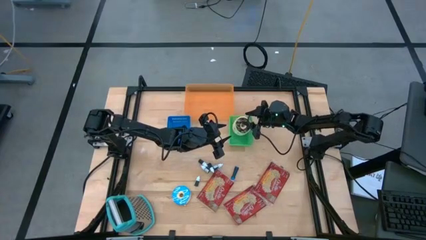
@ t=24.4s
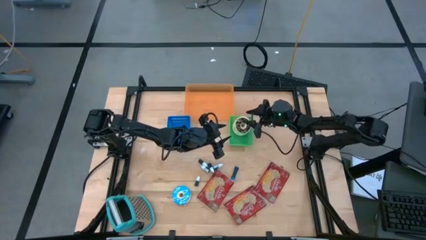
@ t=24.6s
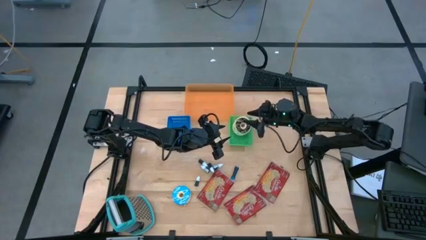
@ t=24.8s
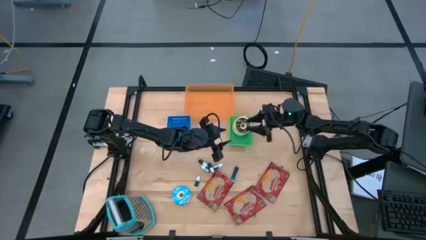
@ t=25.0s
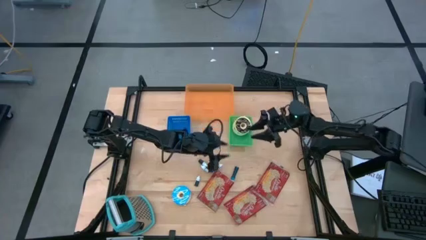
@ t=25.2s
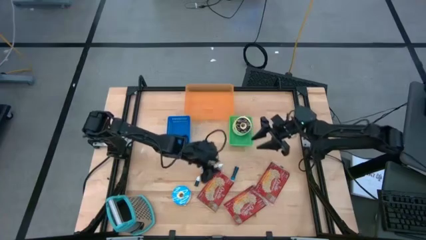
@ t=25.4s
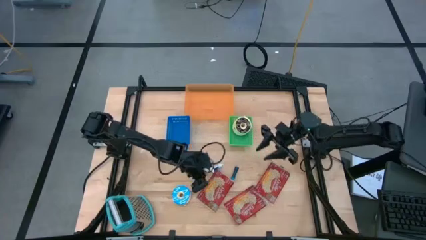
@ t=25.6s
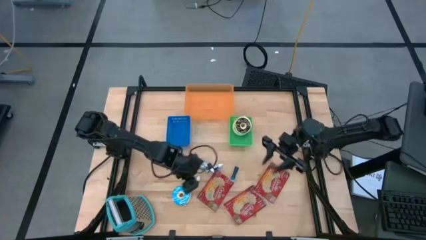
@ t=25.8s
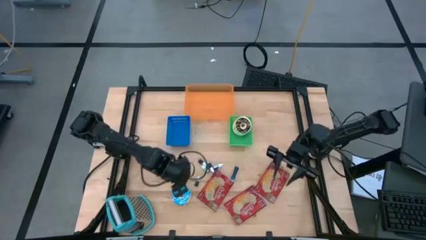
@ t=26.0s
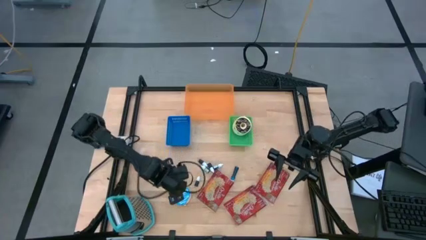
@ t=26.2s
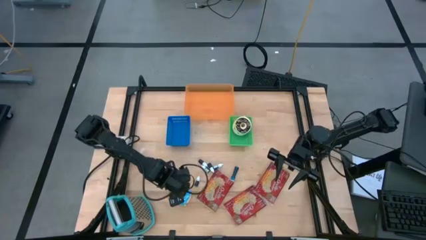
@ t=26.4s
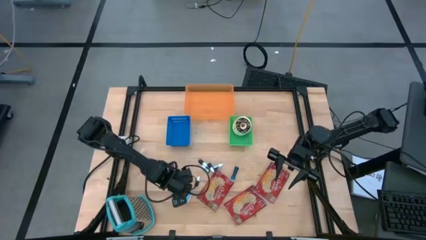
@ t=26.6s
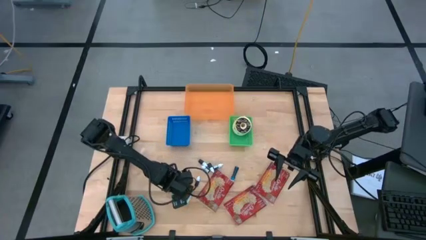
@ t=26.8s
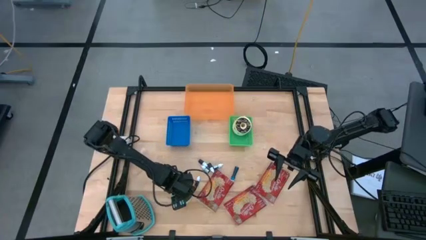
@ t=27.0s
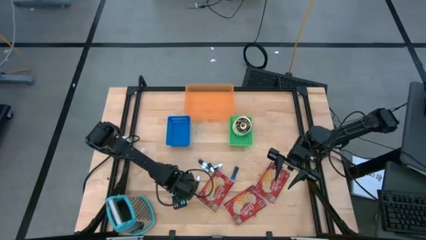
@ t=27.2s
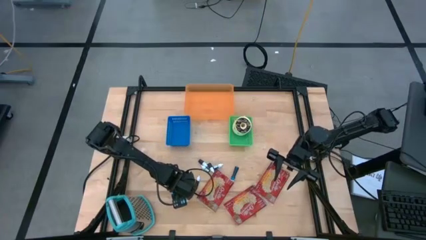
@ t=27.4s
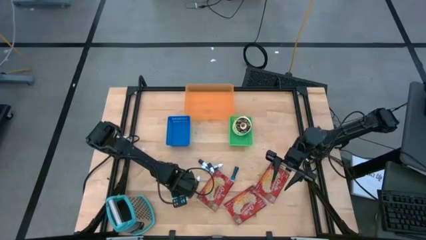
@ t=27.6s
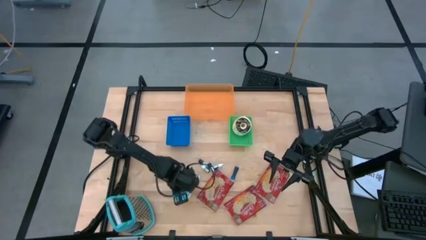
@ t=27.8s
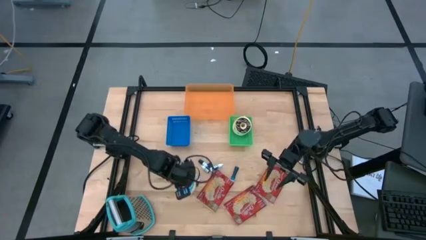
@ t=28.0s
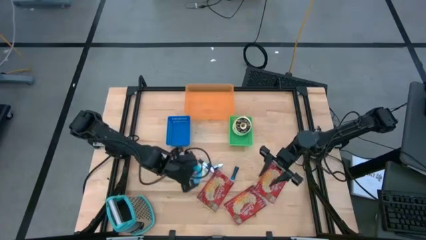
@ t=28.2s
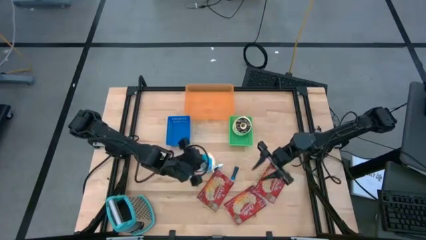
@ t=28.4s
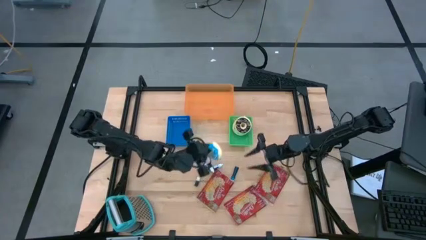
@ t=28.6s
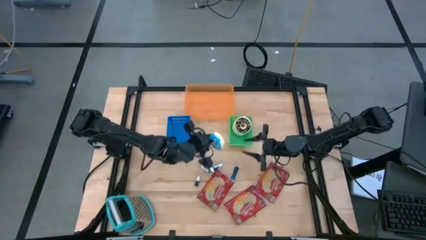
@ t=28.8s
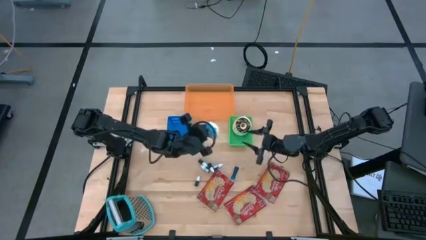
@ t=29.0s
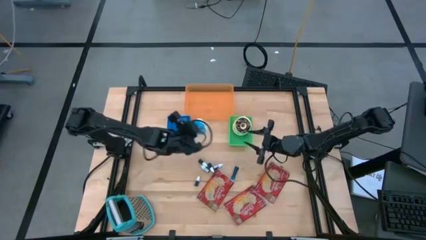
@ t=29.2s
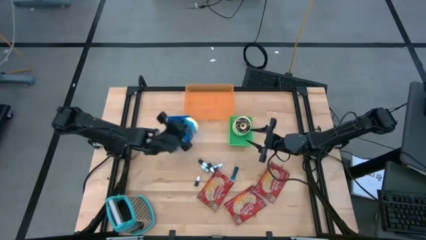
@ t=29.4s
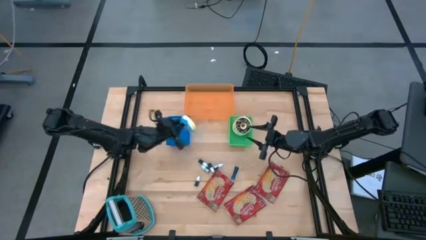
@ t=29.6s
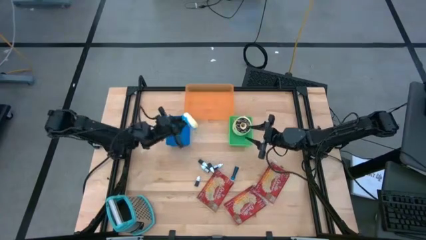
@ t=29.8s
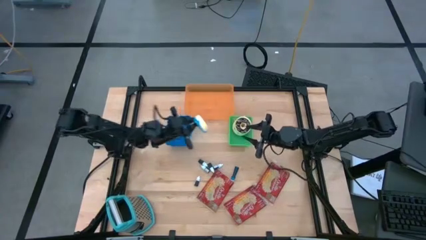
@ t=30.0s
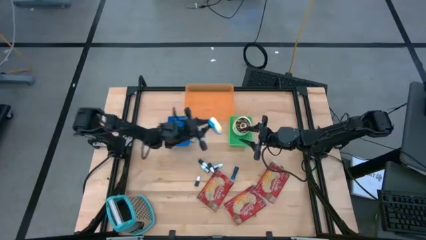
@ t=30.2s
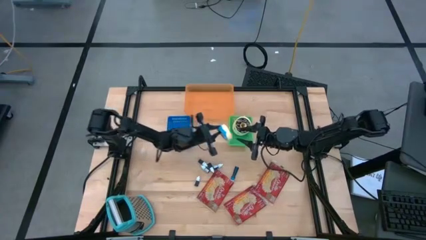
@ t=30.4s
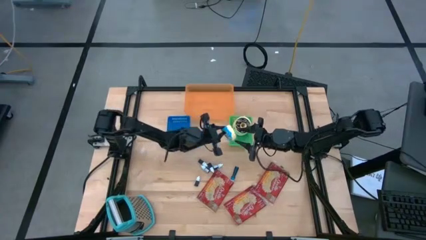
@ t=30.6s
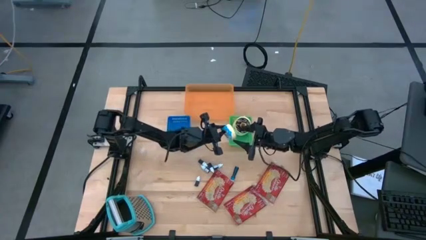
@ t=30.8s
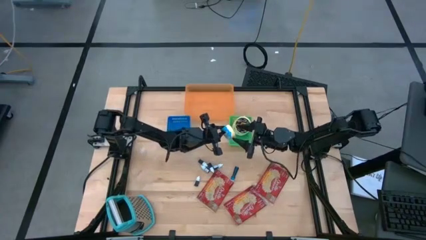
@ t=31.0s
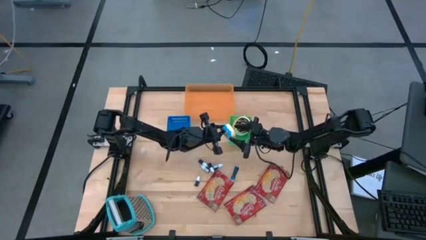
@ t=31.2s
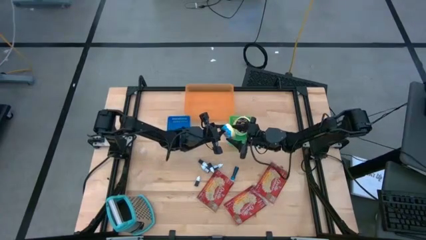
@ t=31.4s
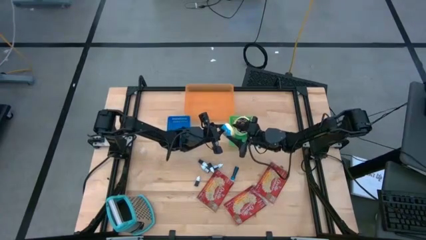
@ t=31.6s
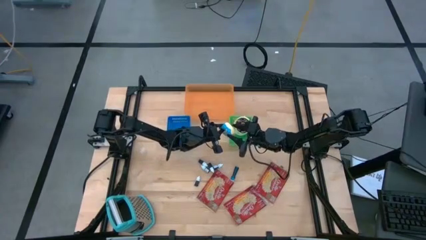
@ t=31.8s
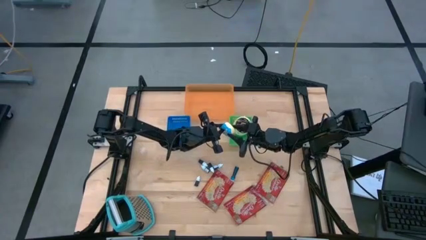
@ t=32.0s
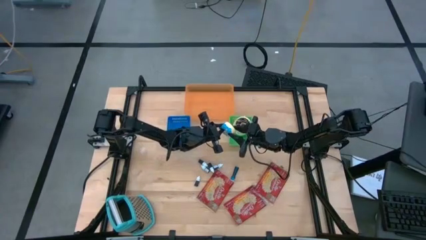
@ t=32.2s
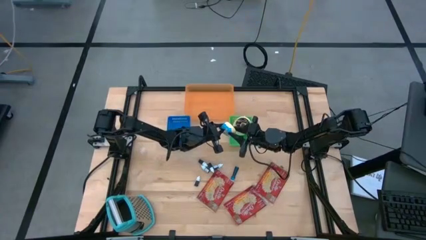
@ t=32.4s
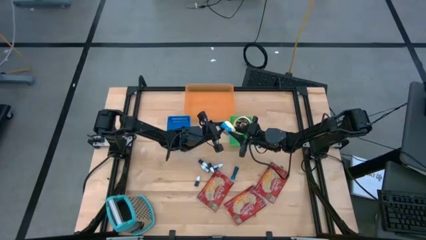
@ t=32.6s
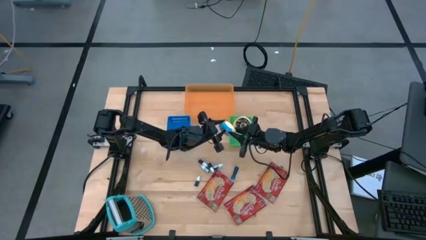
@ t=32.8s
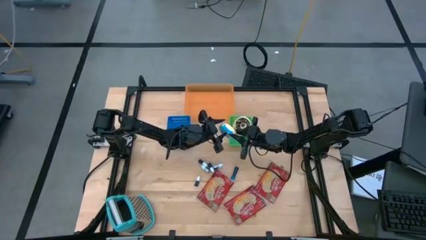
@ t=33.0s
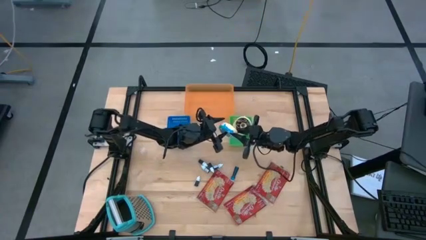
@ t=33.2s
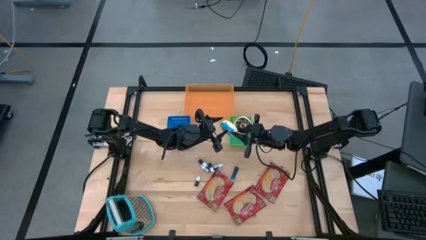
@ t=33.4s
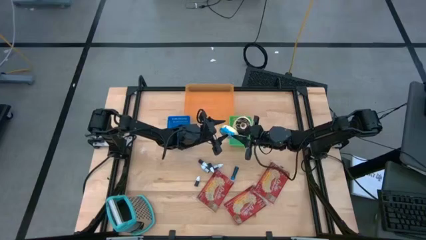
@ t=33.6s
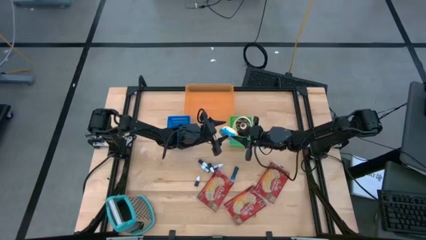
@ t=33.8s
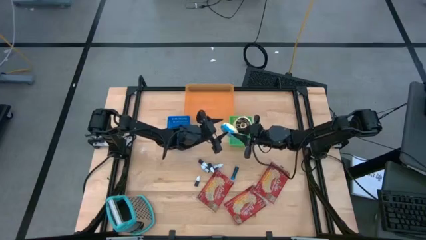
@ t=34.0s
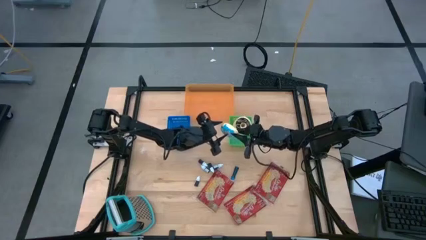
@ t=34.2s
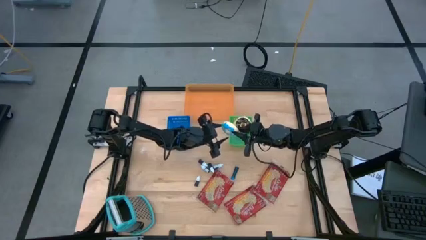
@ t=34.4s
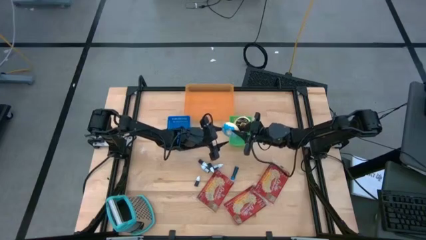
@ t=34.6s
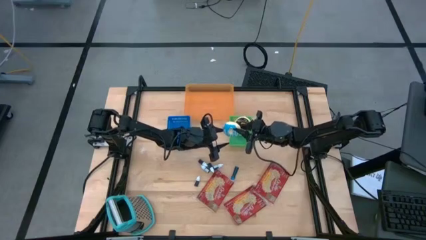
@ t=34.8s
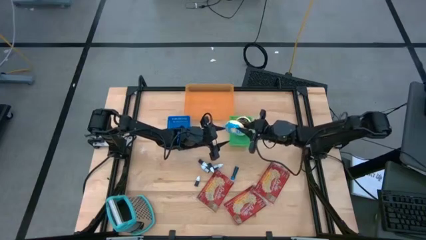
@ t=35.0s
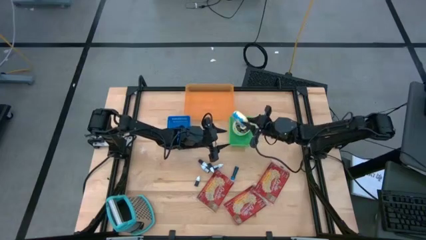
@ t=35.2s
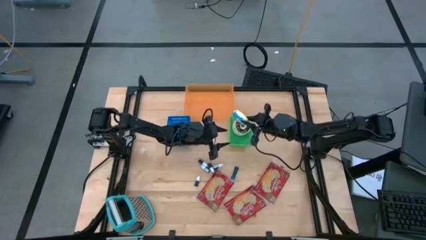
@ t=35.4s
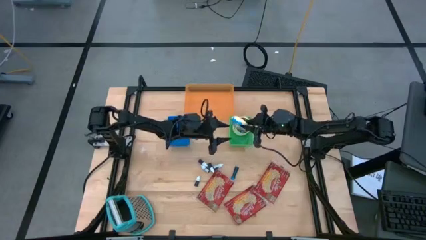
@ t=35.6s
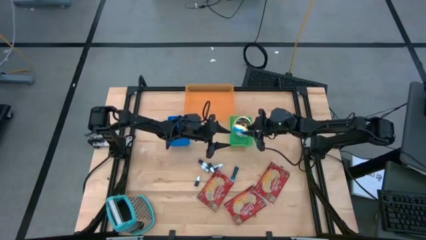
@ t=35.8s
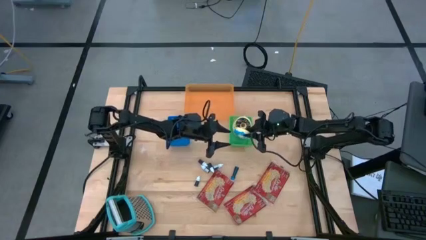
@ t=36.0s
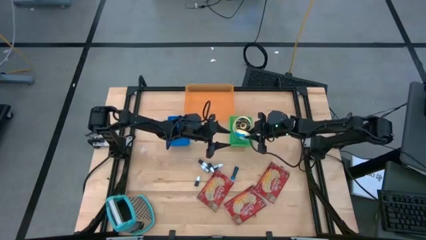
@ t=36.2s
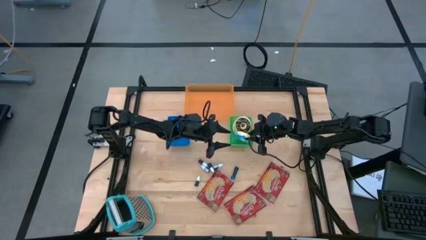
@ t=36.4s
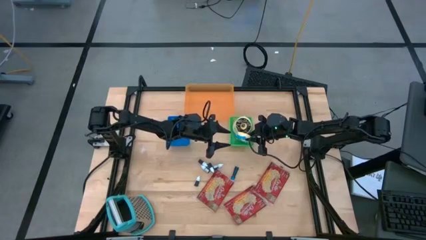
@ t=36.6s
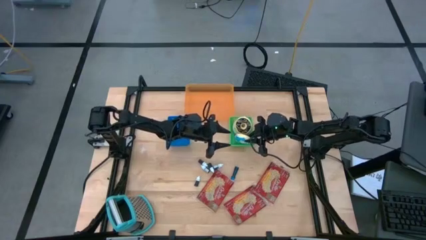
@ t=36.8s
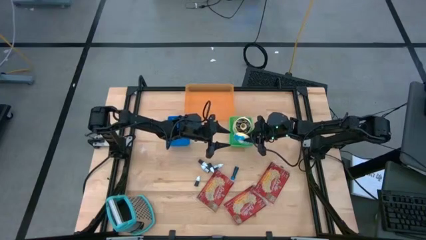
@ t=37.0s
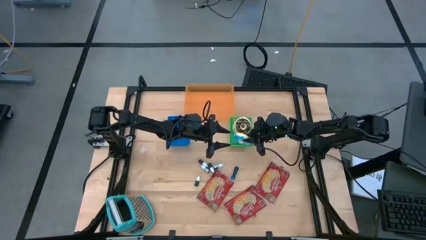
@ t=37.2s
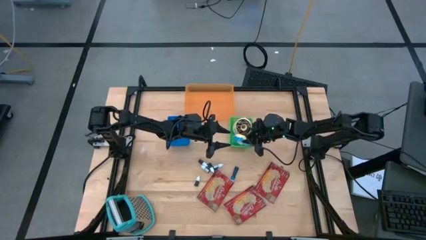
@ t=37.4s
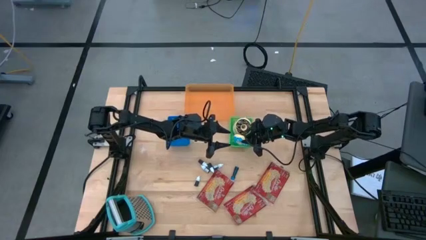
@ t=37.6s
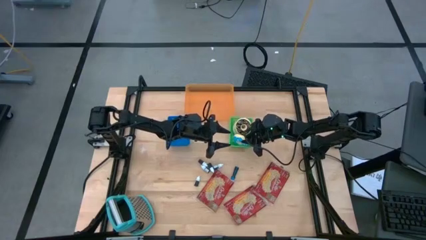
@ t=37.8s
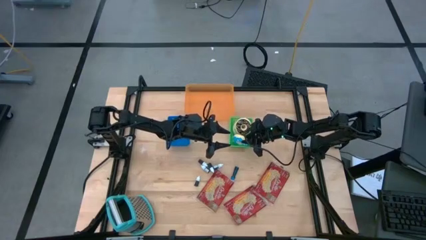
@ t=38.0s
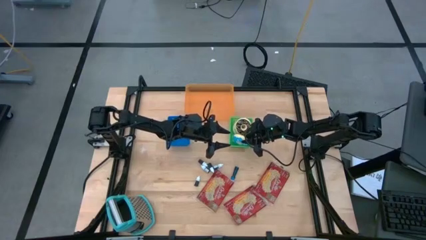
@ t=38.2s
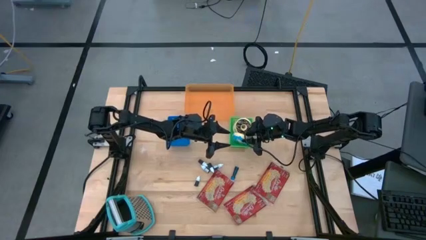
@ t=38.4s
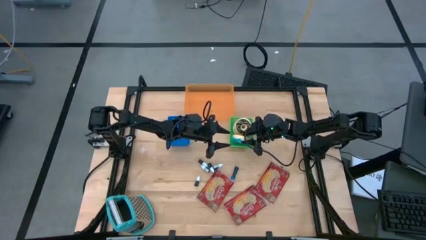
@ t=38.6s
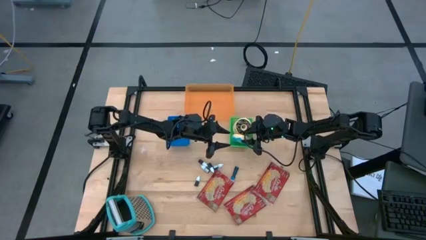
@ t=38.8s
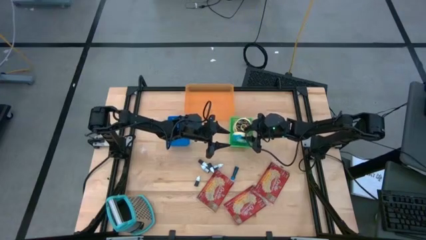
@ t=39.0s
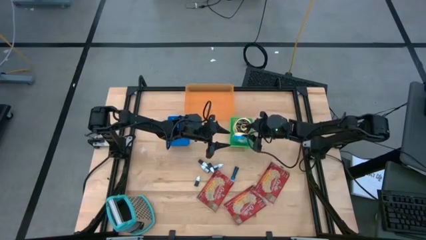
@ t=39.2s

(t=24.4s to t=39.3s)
Put the blue doughnut into the green bin
